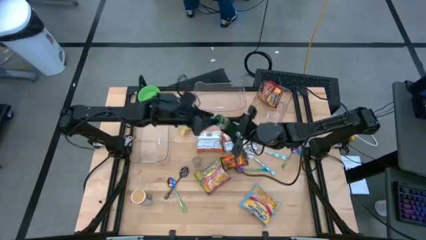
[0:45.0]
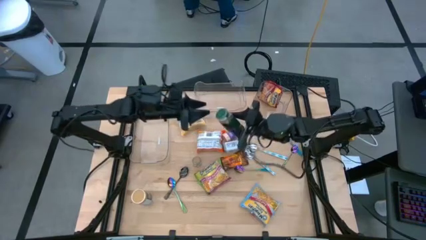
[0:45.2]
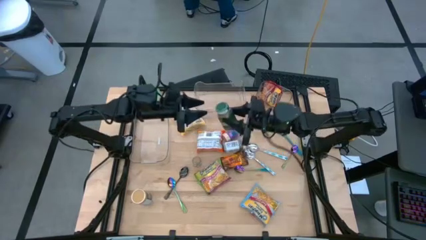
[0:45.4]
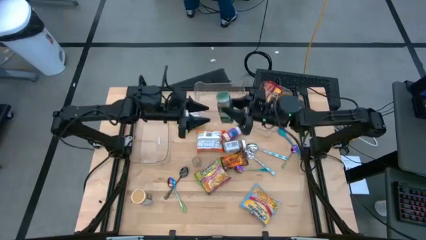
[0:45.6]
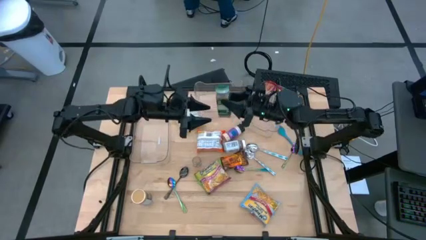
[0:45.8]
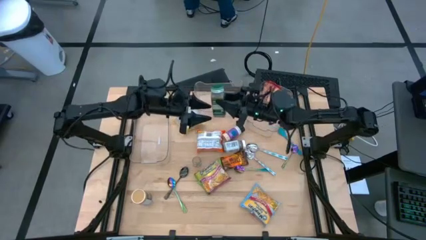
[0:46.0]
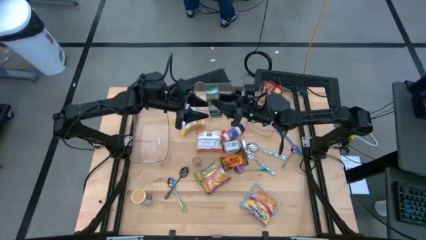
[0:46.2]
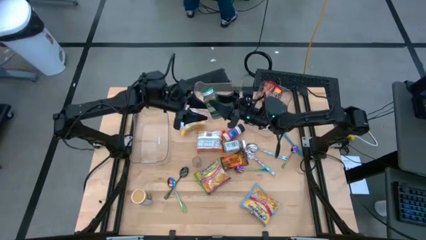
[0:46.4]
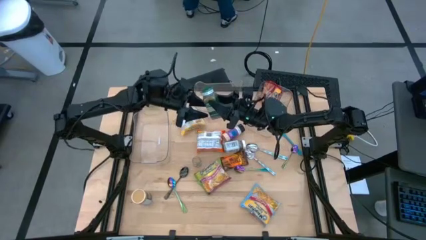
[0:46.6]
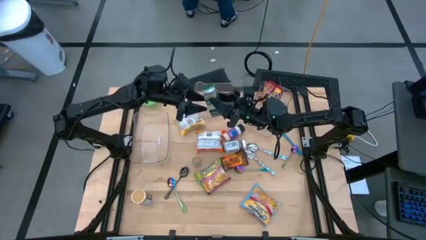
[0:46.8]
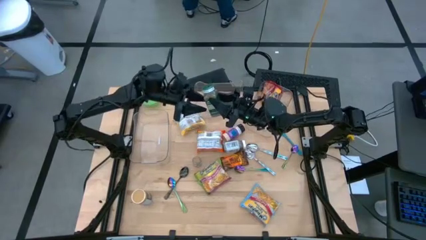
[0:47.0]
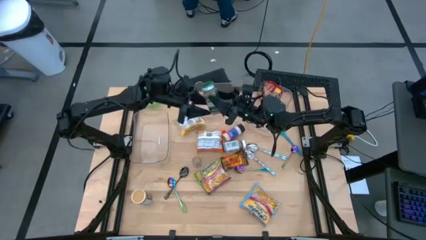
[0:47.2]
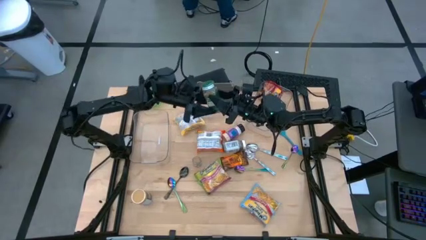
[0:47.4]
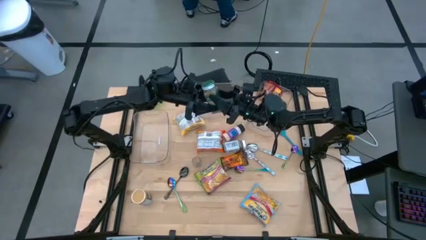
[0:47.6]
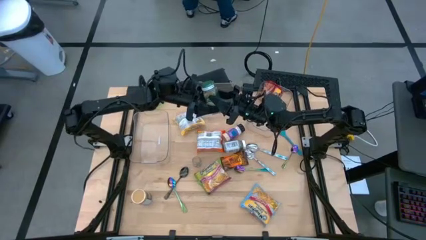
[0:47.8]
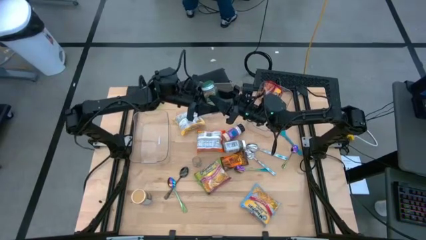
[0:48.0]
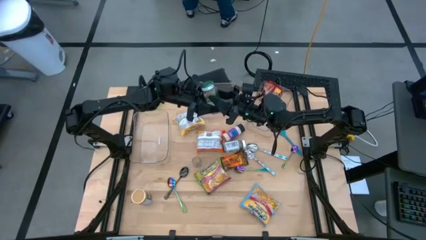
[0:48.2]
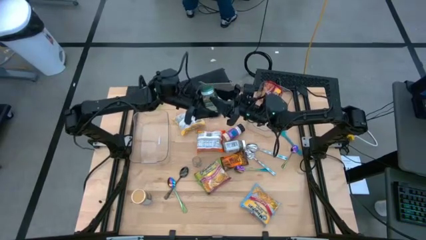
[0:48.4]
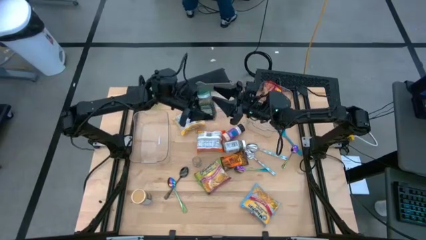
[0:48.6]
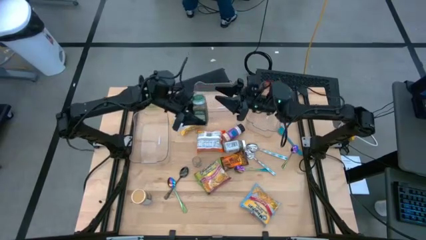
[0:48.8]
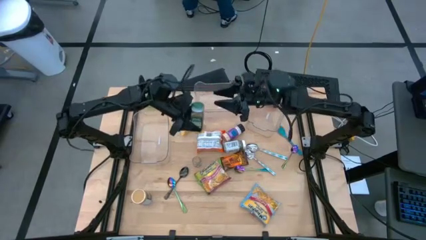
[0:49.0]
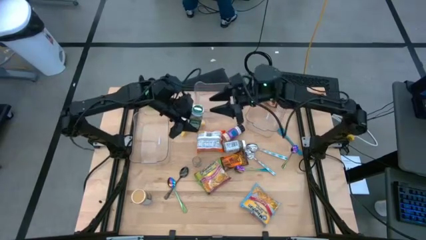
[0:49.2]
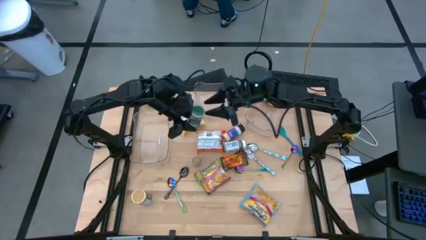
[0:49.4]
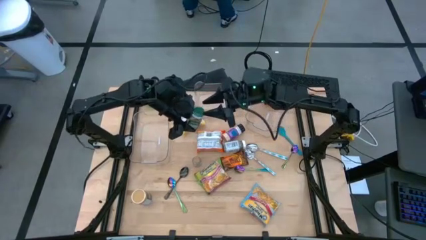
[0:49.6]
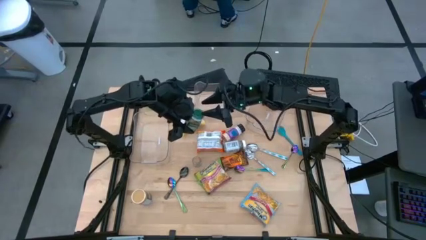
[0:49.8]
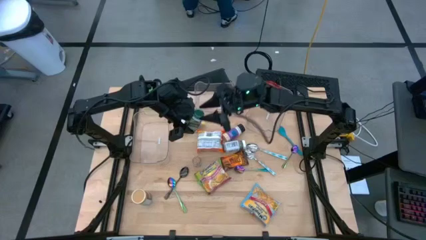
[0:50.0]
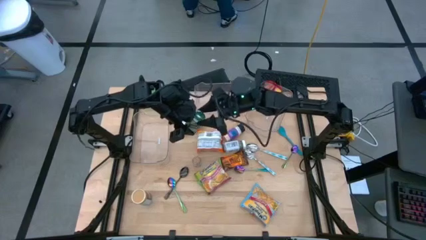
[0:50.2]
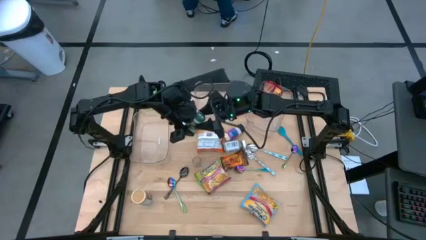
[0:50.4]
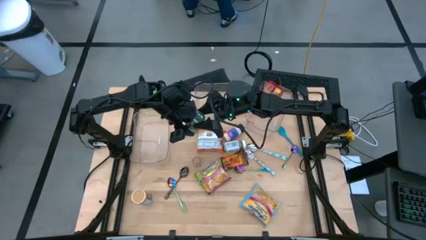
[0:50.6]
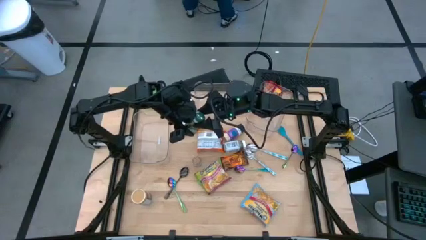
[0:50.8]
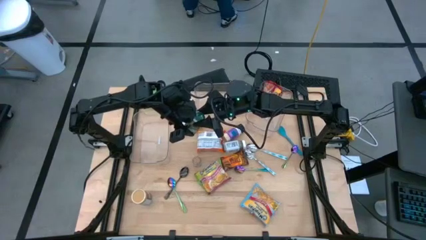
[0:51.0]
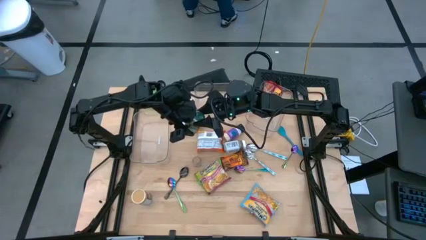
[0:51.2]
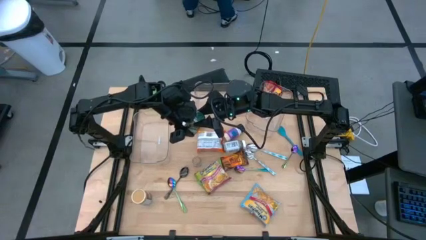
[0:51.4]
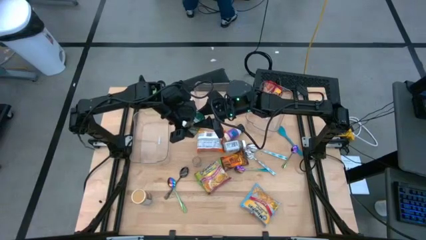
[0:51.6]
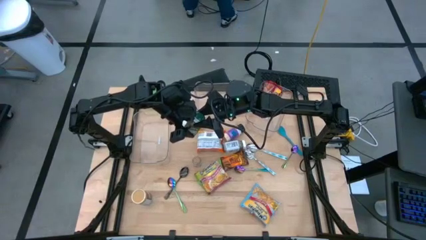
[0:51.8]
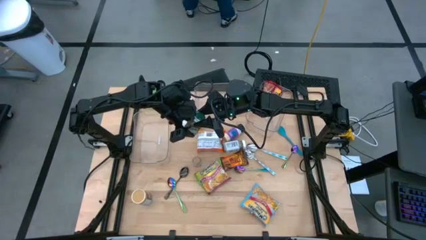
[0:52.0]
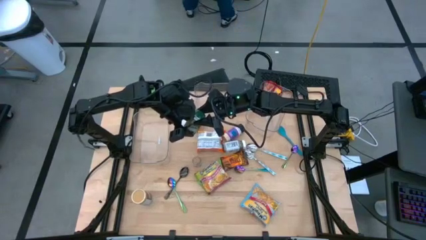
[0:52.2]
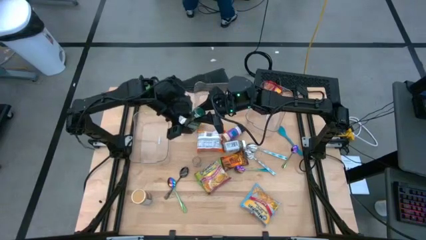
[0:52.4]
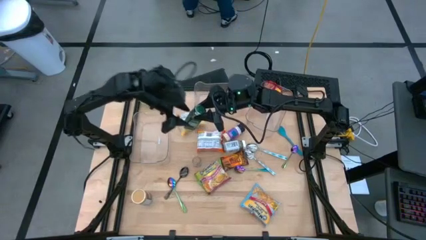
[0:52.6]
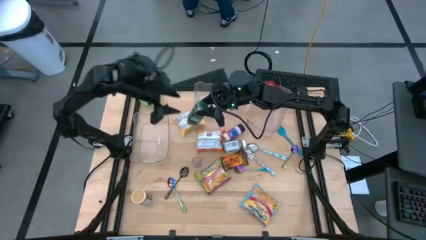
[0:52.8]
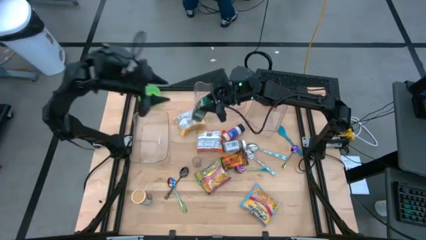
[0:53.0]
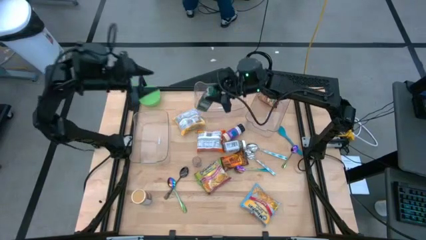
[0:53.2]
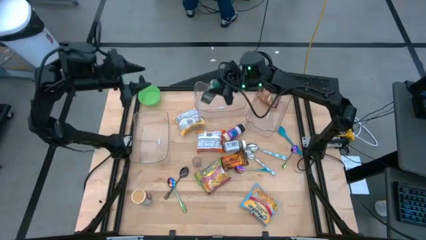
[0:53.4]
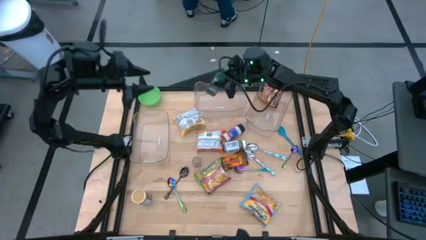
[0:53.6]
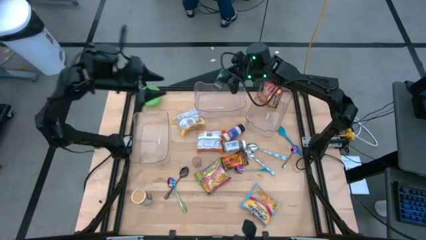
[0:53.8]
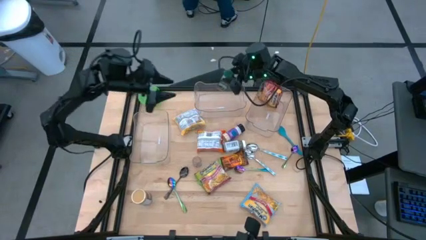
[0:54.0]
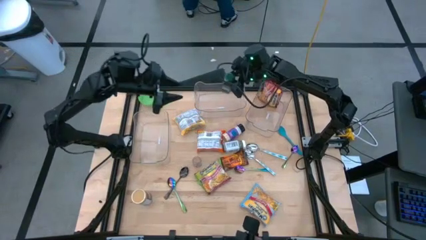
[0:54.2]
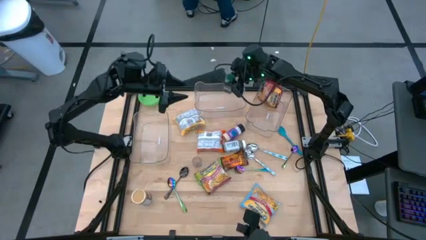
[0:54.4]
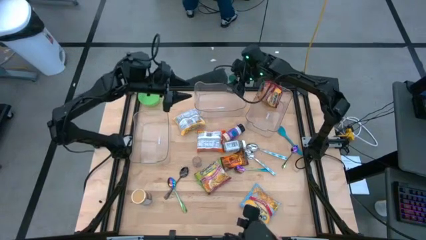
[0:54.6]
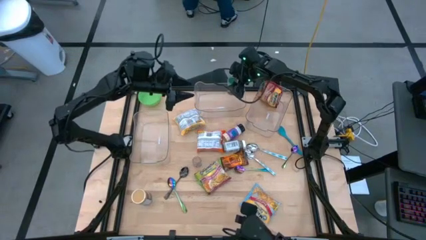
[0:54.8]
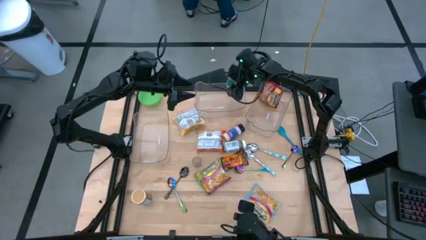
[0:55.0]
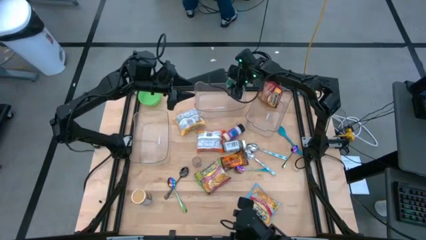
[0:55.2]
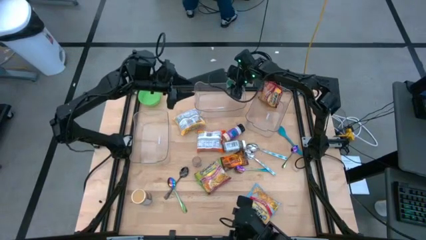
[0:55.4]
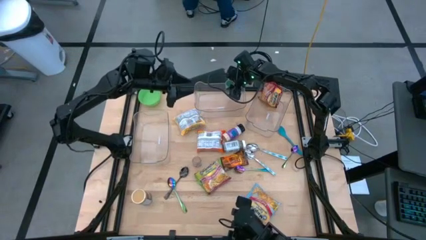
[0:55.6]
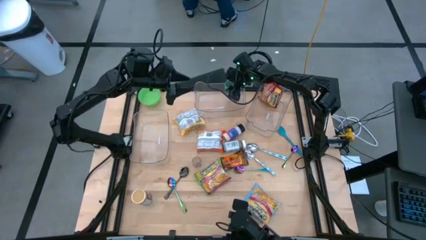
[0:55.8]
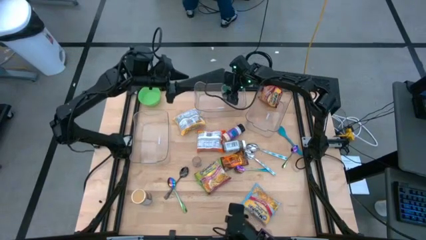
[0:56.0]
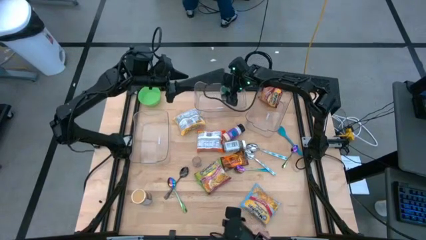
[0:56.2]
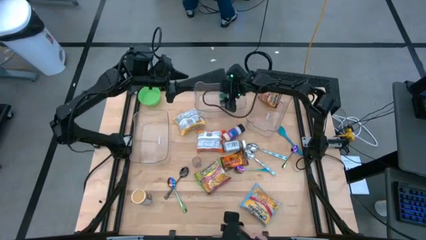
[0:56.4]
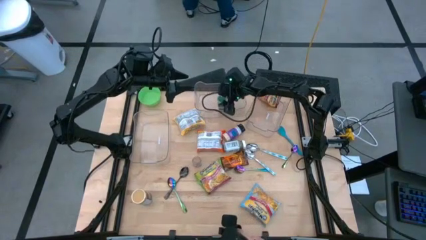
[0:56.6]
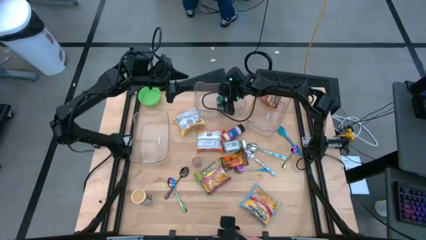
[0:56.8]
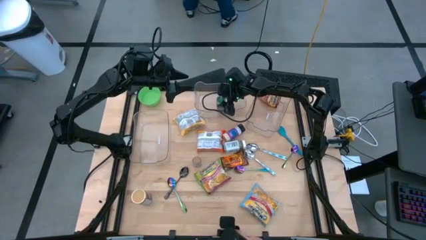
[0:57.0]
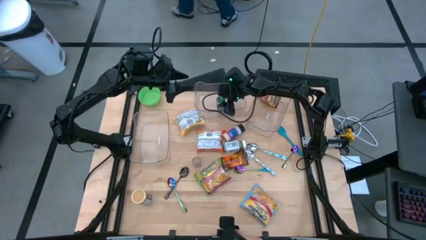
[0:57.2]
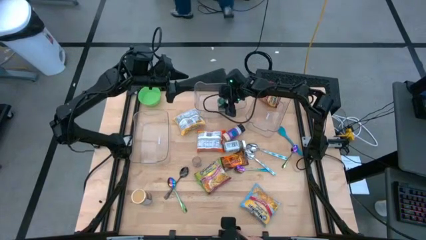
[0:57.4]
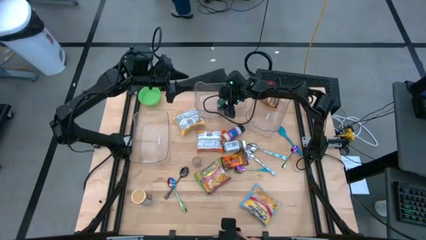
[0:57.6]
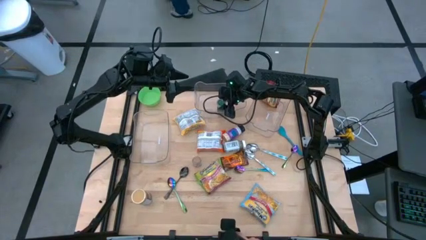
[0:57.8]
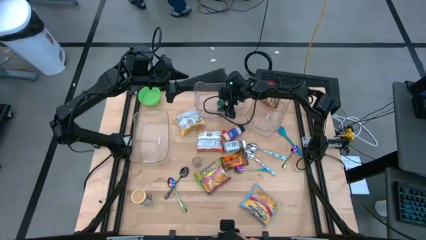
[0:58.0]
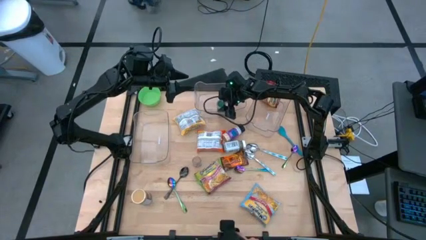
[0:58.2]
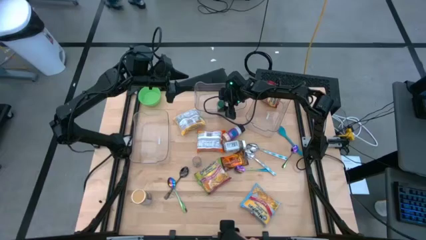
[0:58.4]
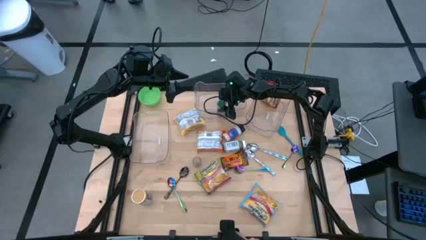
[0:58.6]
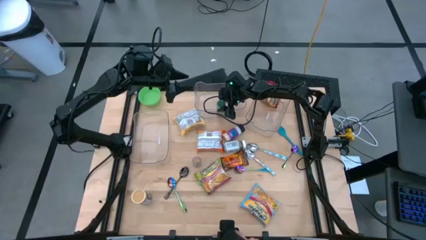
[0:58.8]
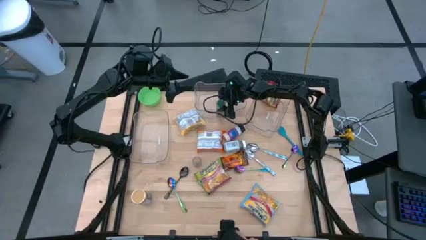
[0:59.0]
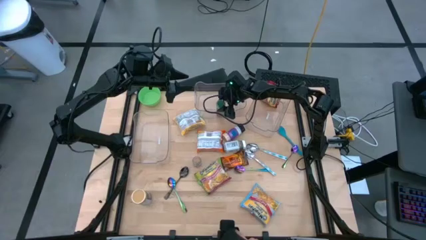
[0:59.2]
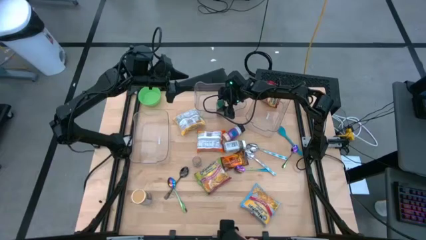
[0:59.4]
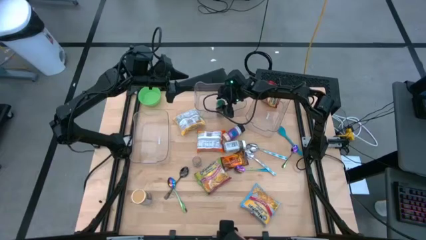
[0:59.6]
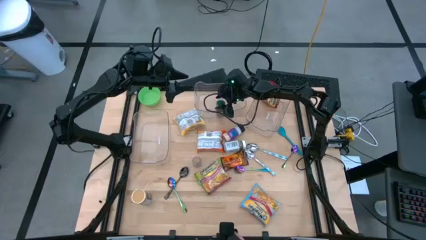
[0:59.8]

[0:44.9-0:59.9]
Task: Pick & Place Food Item
Put the green spice bottle into the middle transparent bin
